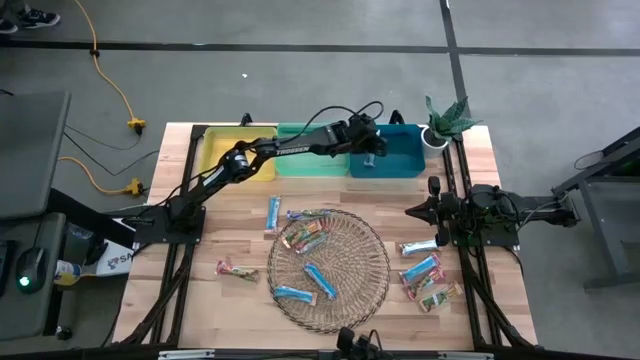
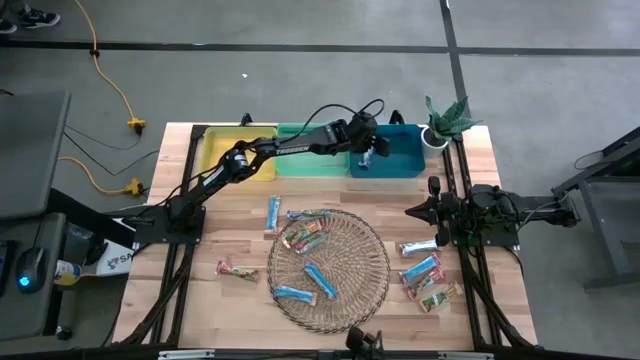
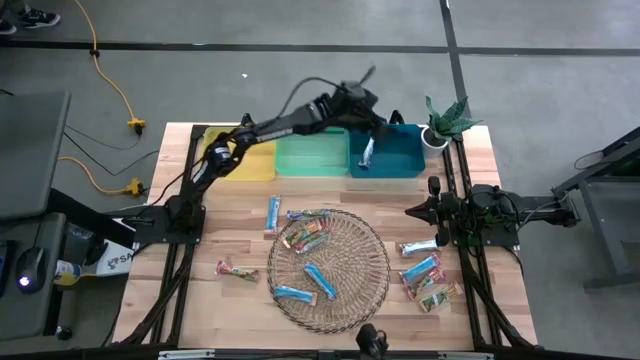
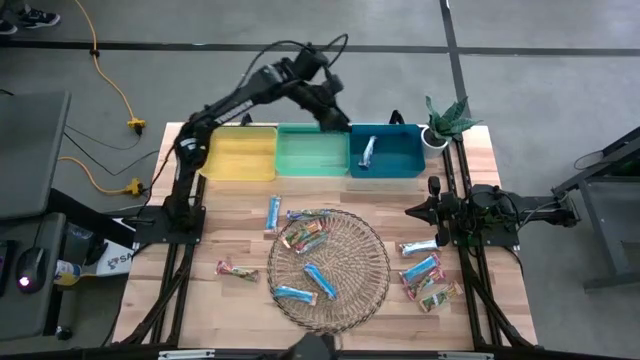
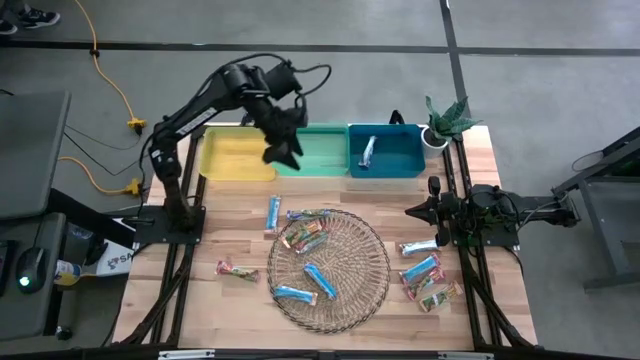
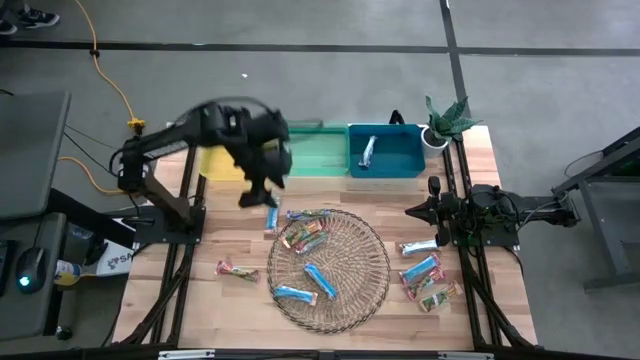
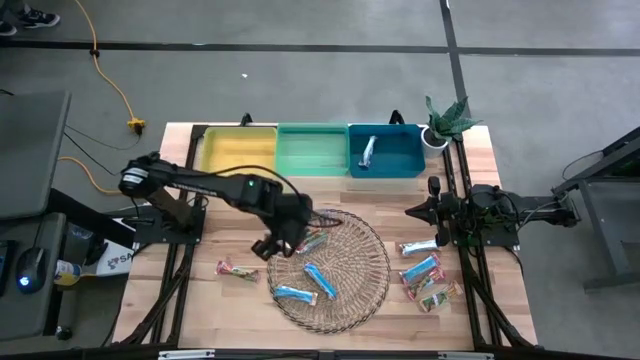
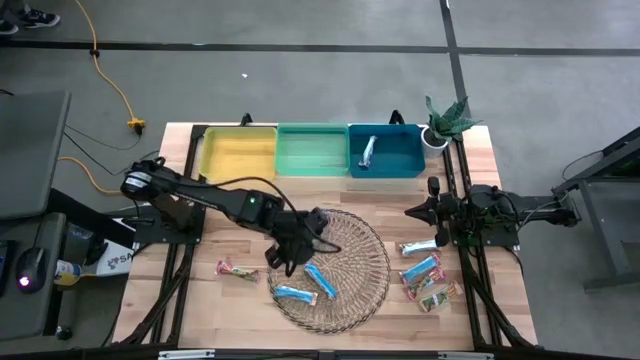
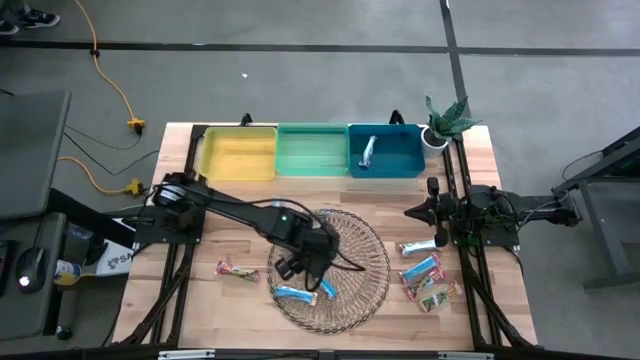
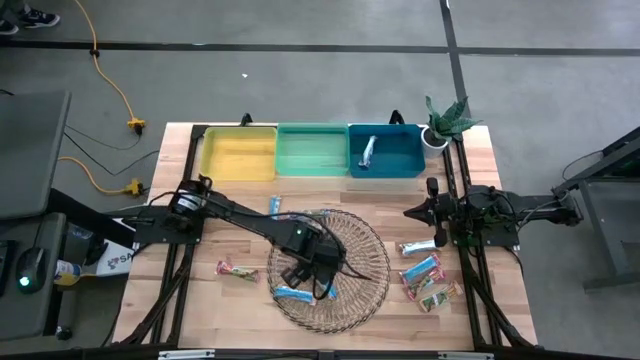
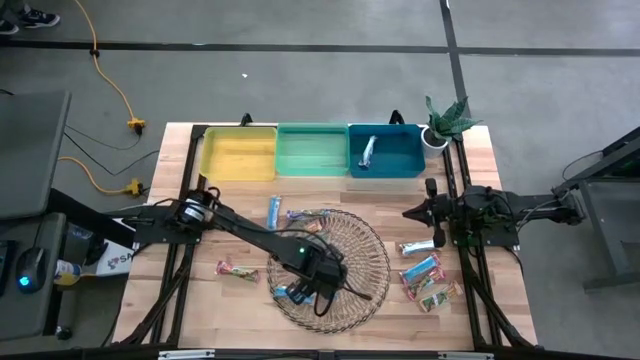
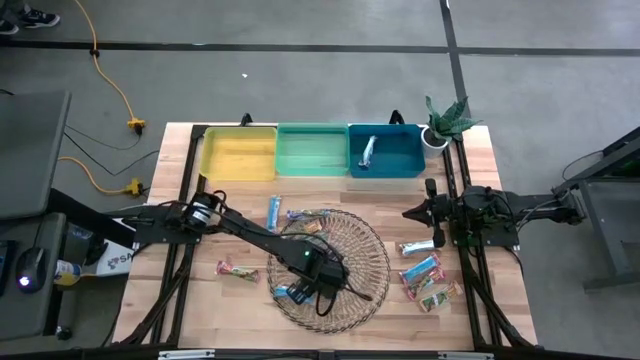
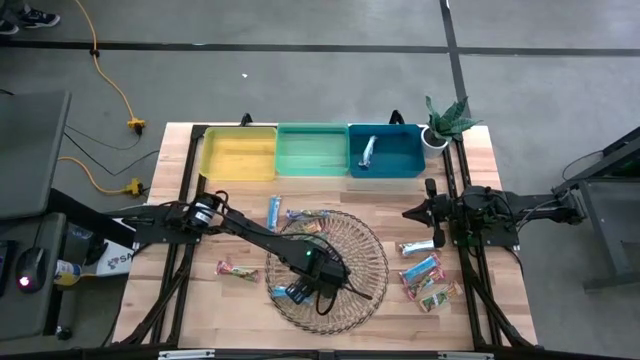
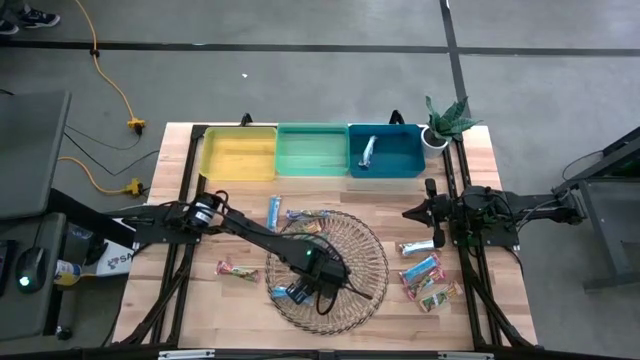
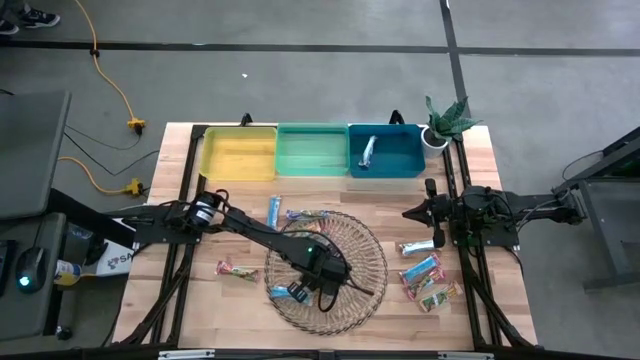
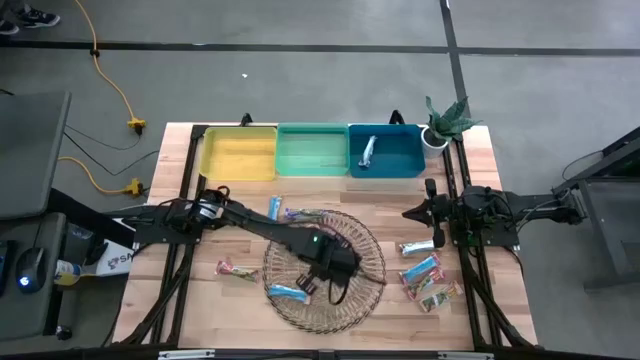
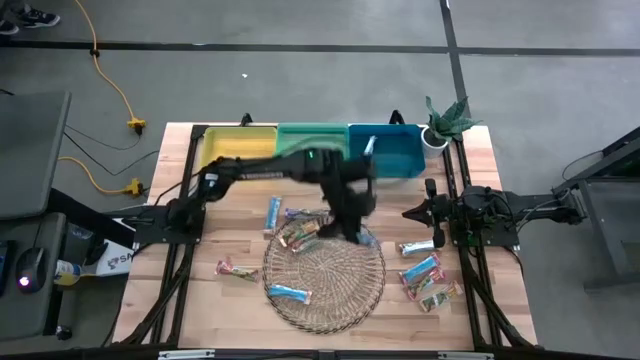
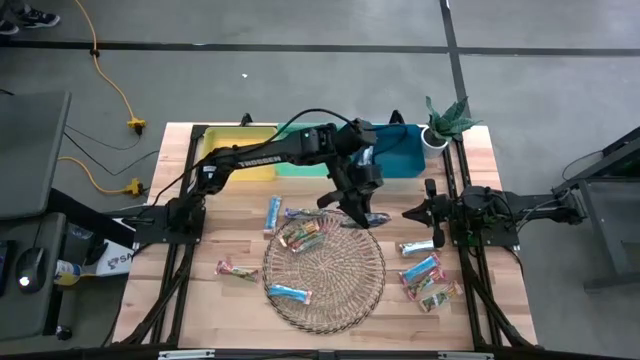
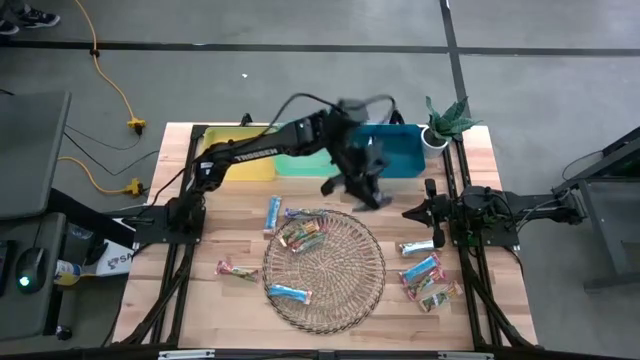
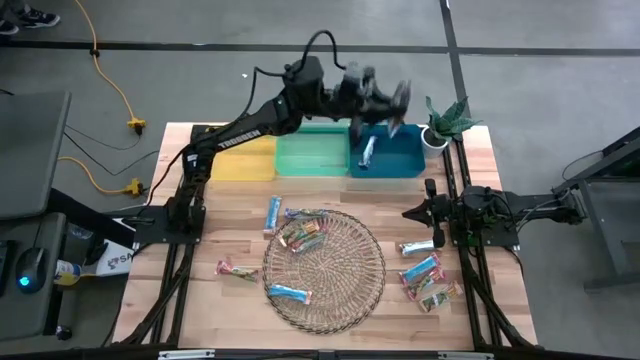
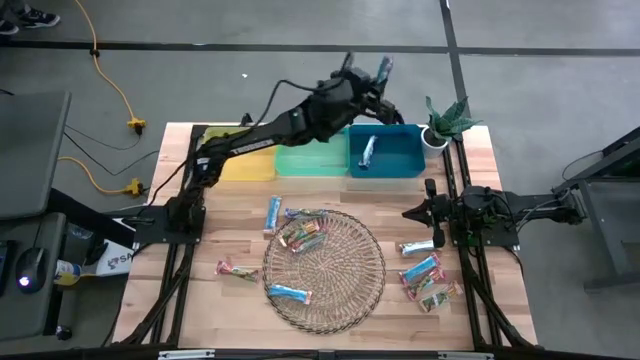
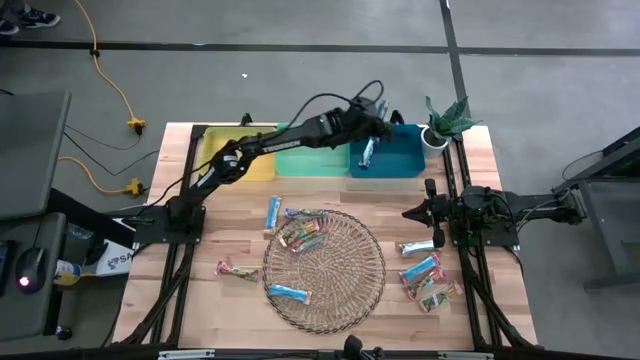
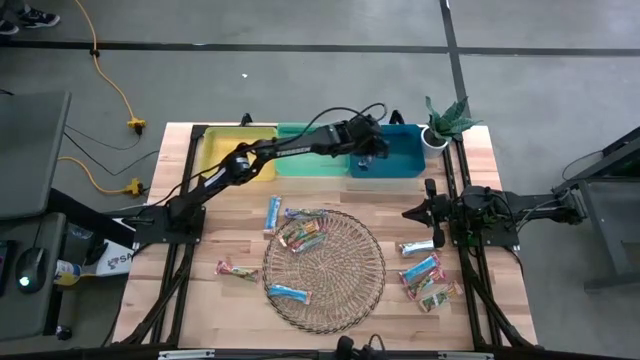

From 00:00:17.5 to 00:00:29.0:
Task: Pick and place Granola Bars by type
Put the bottom blue granola bar into the blue bin

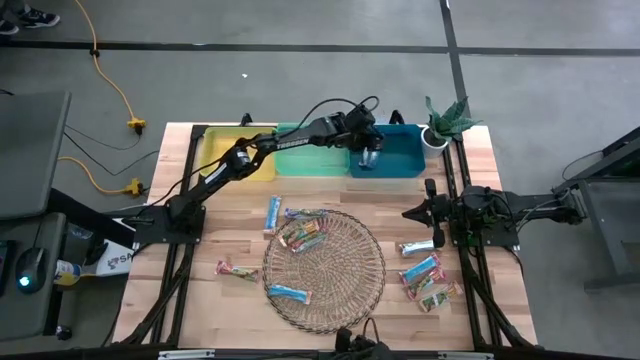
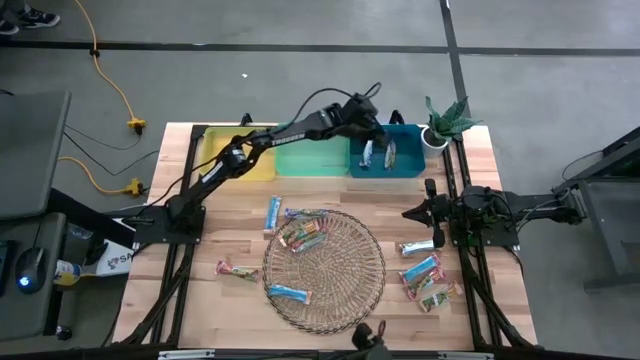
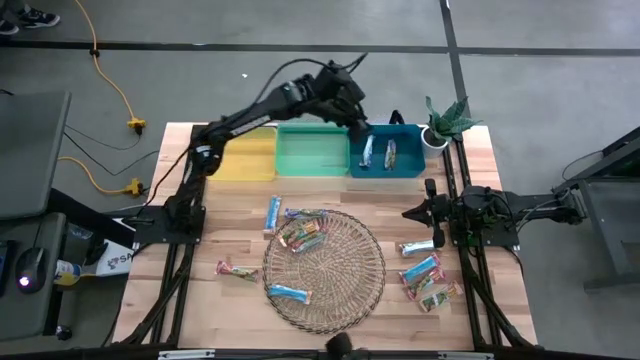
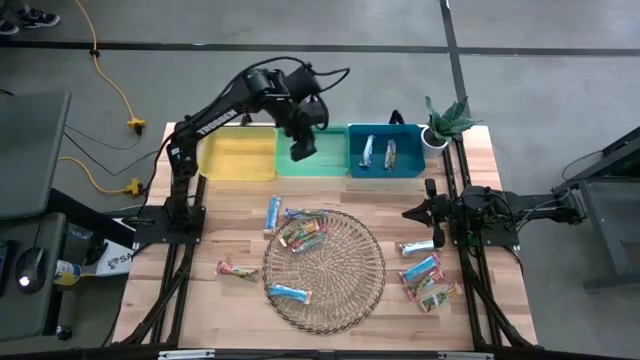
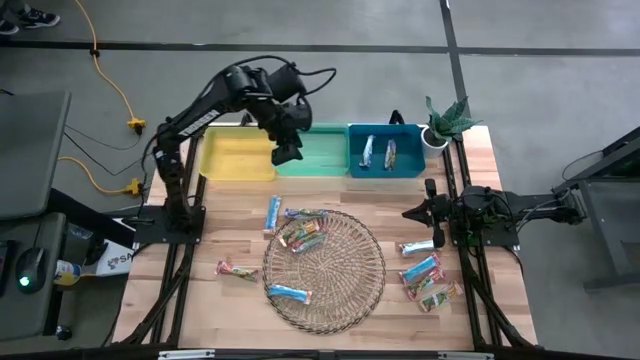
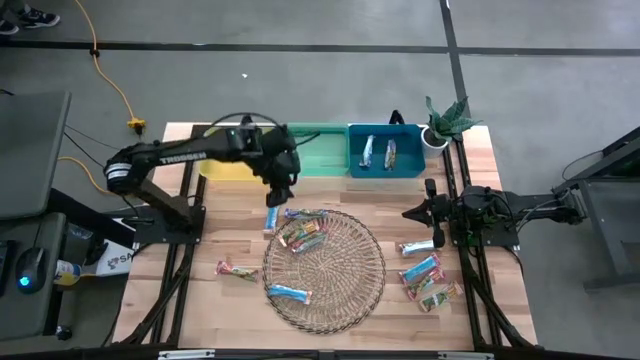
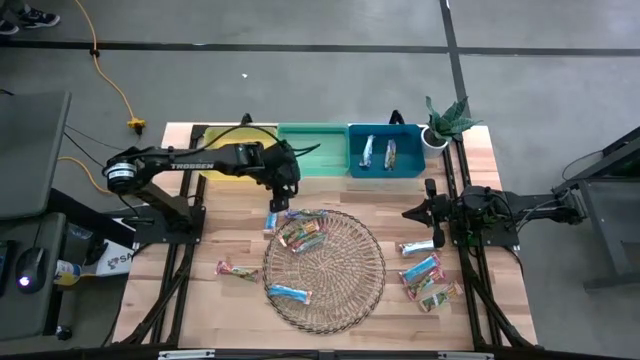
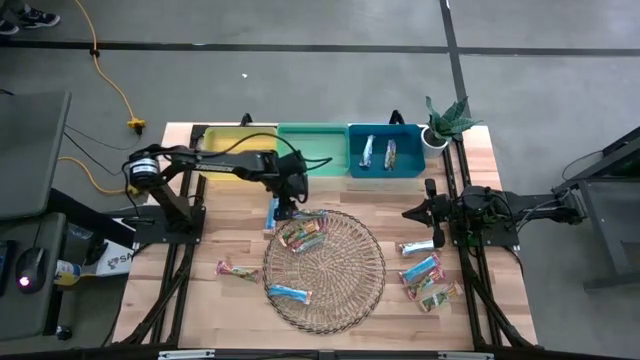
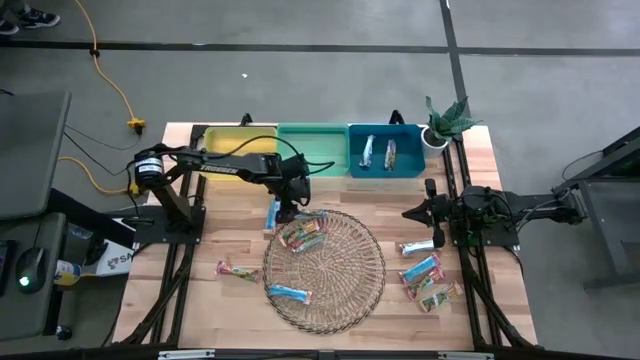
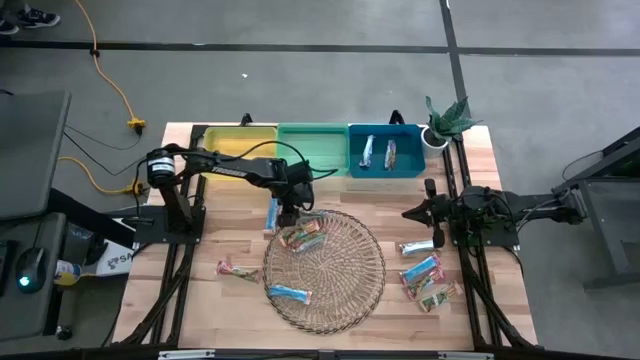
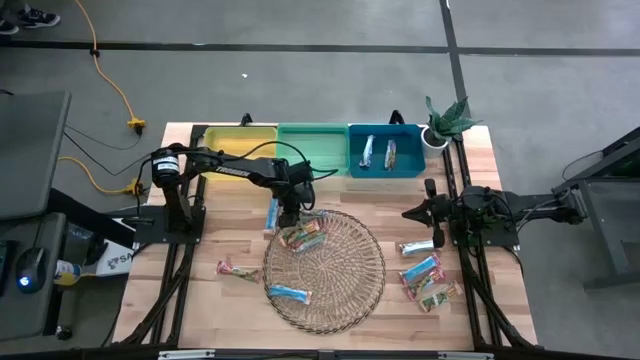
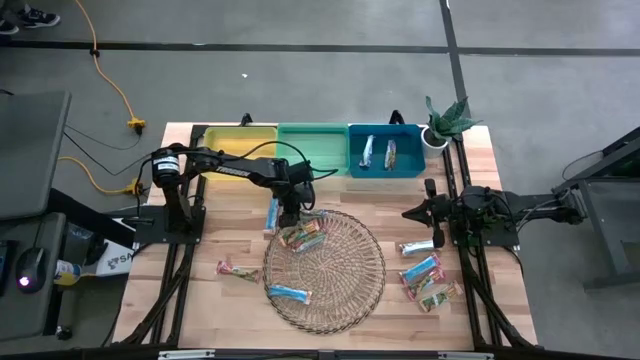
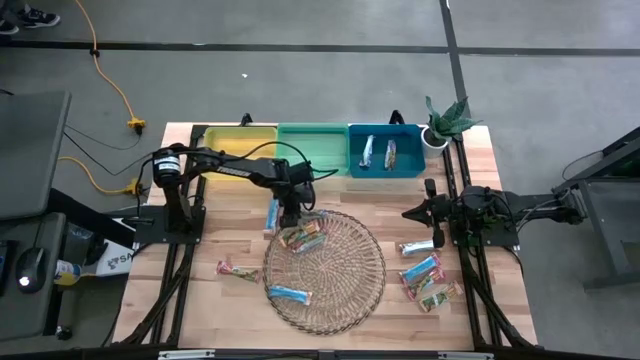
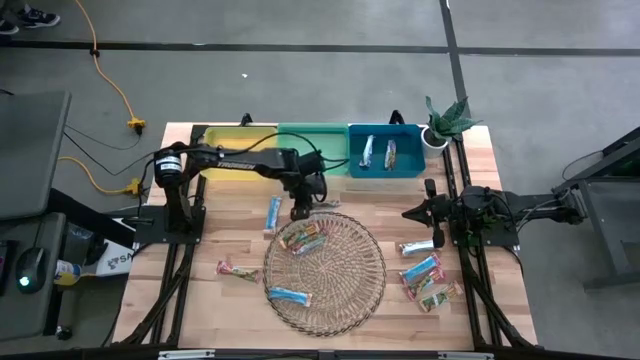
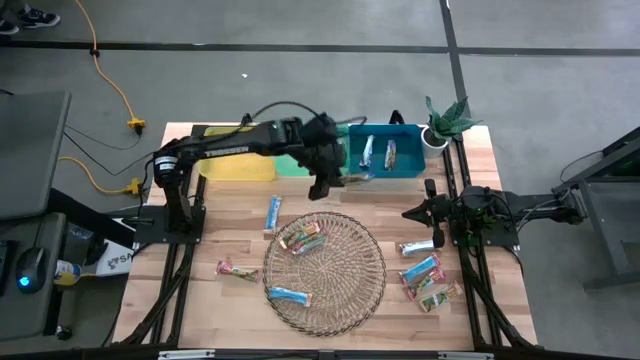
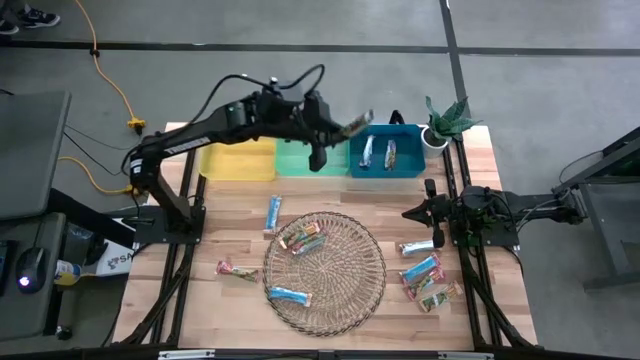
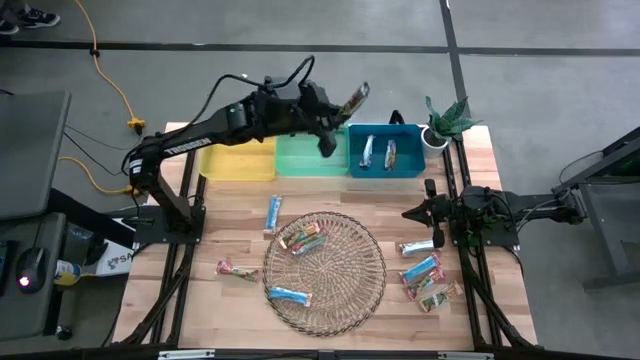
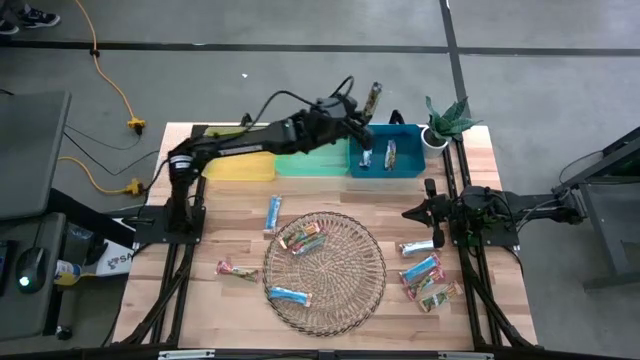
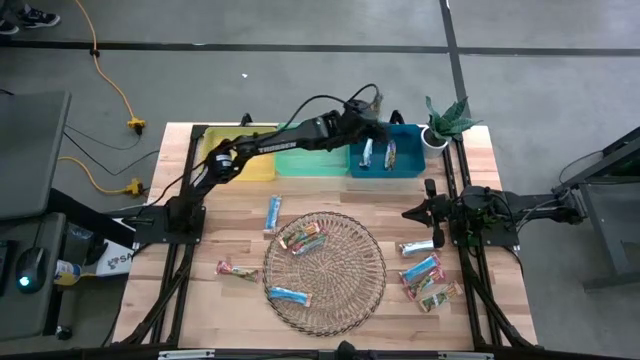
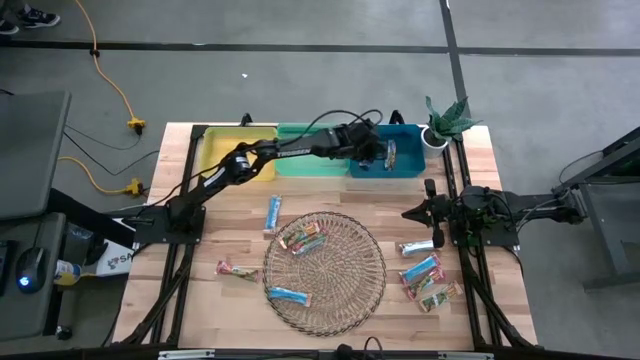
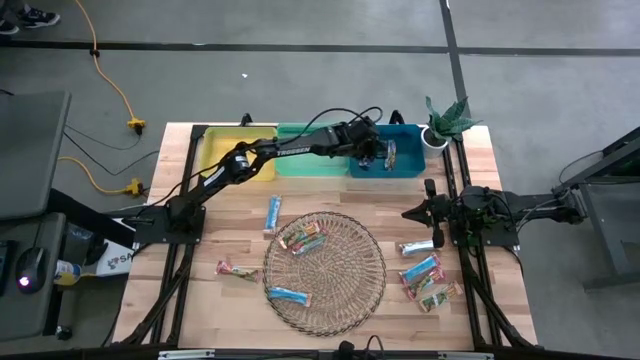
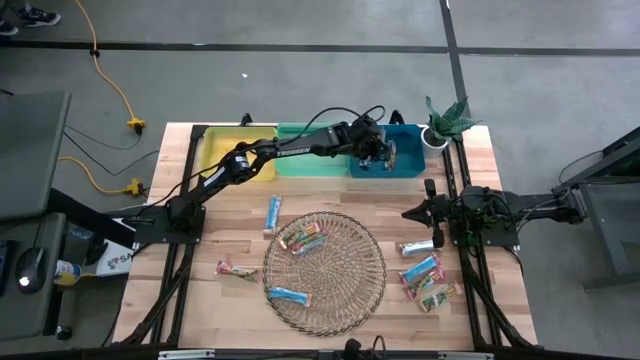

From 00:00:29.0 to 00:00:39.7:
Put the blue granola bar into the blue bin
